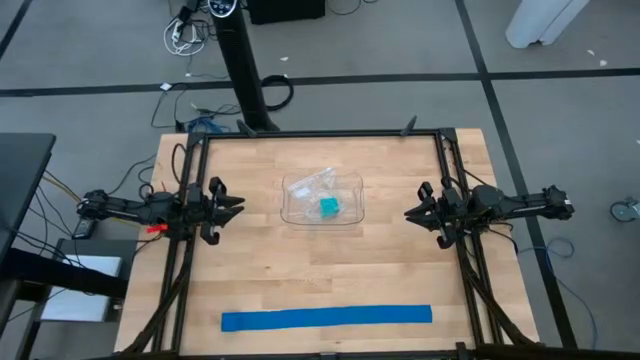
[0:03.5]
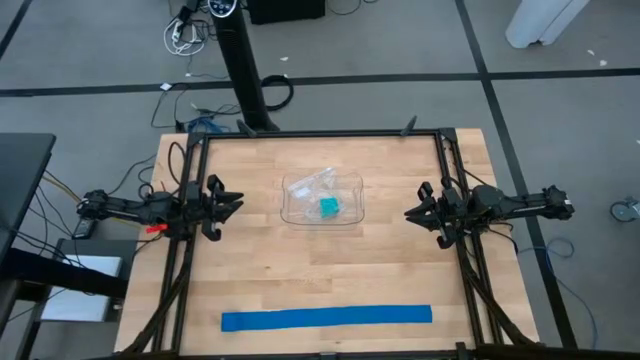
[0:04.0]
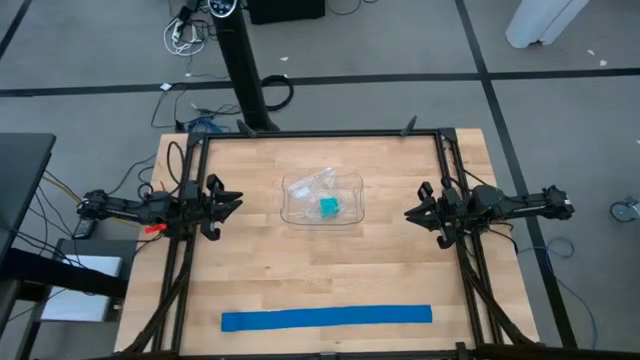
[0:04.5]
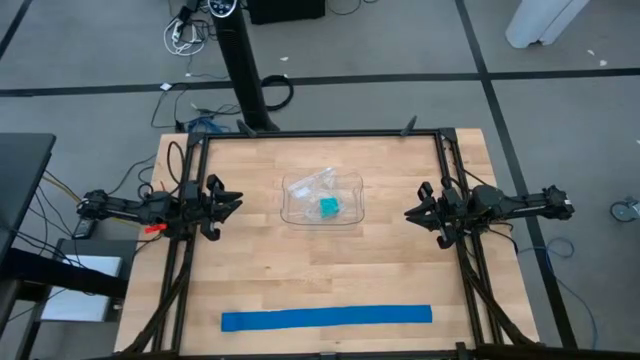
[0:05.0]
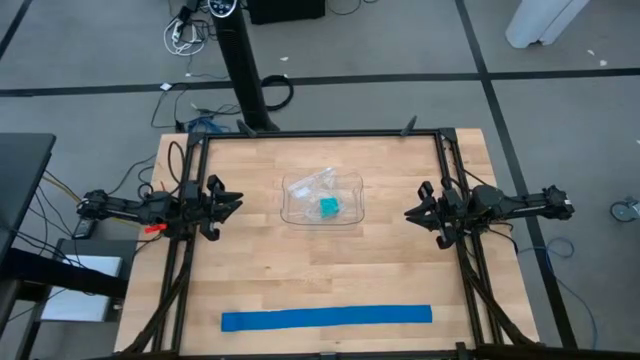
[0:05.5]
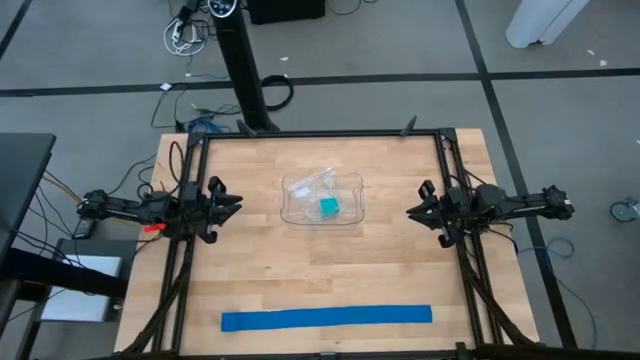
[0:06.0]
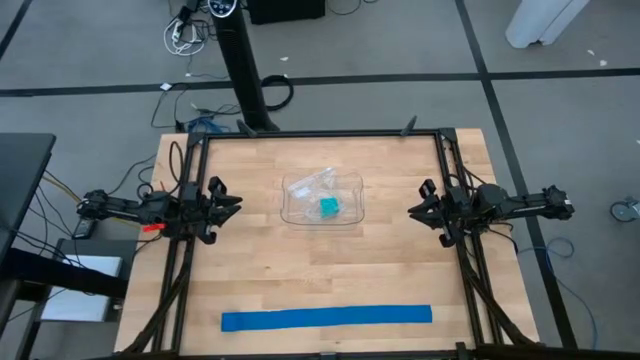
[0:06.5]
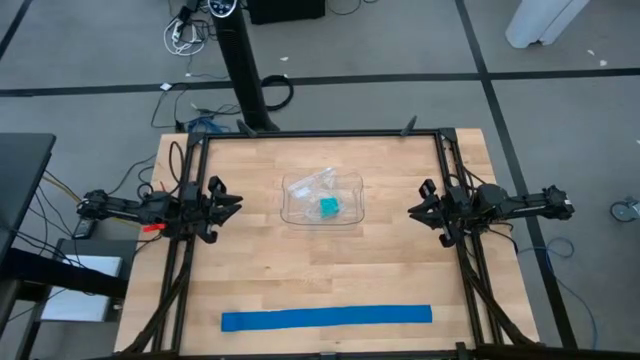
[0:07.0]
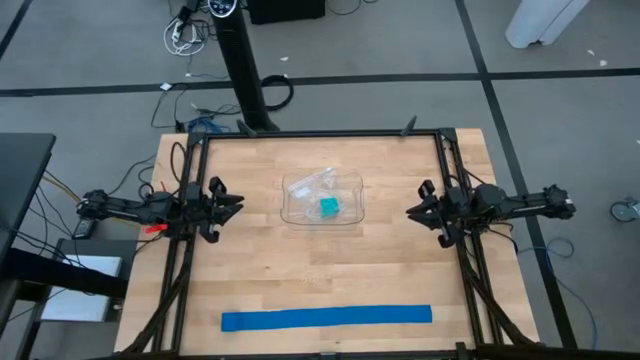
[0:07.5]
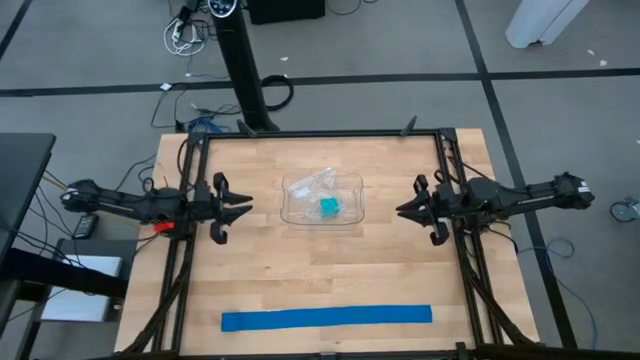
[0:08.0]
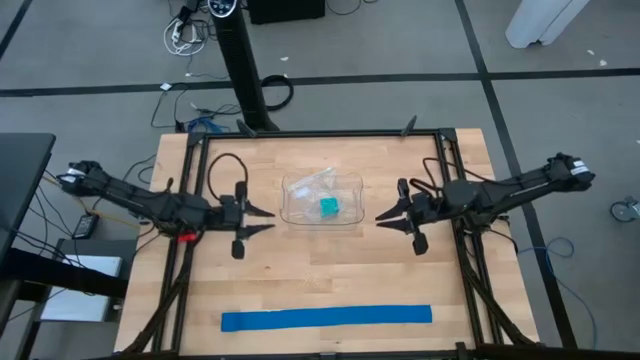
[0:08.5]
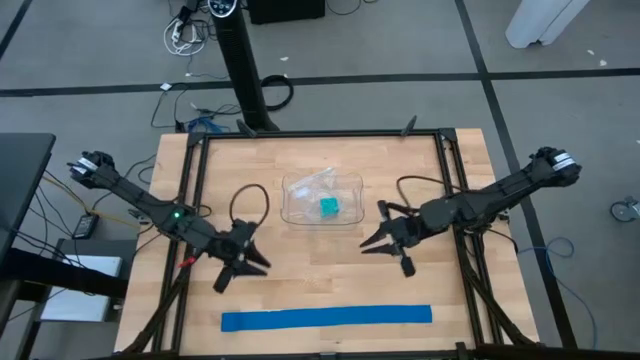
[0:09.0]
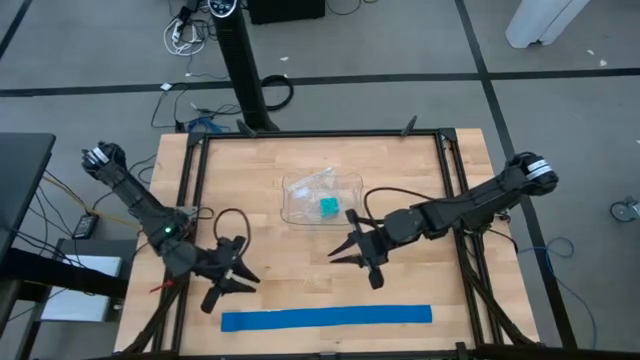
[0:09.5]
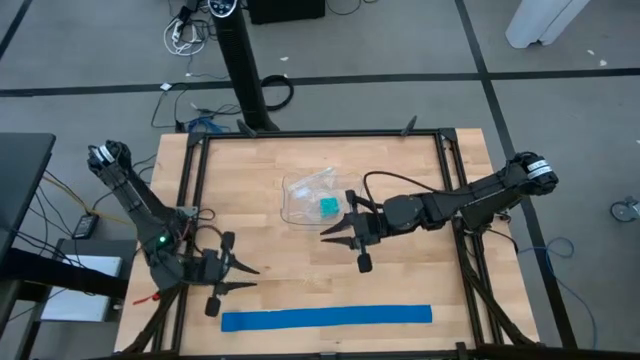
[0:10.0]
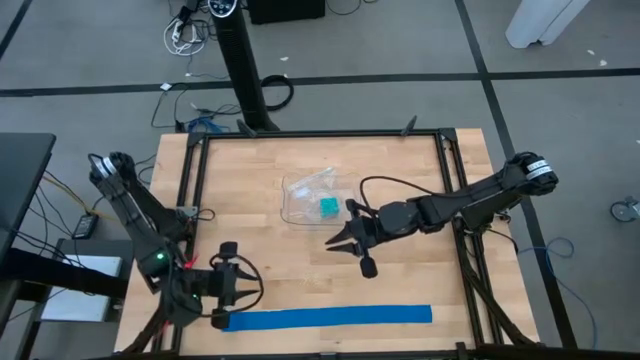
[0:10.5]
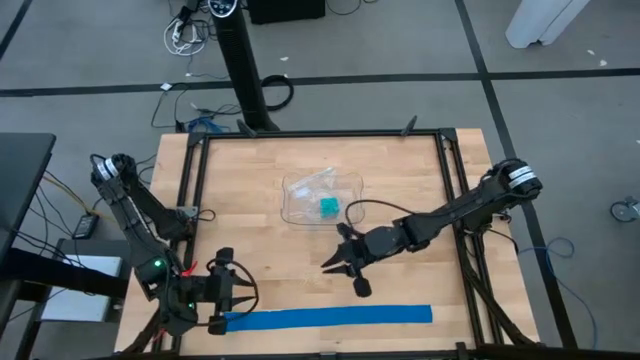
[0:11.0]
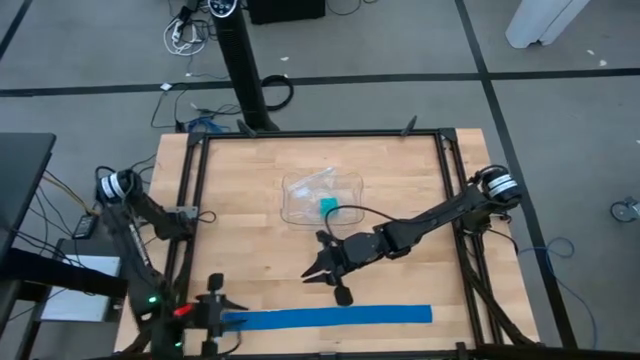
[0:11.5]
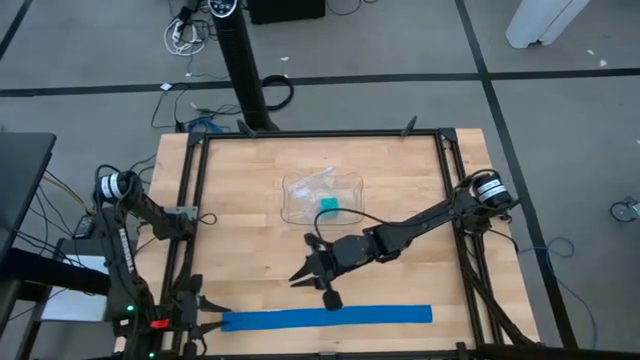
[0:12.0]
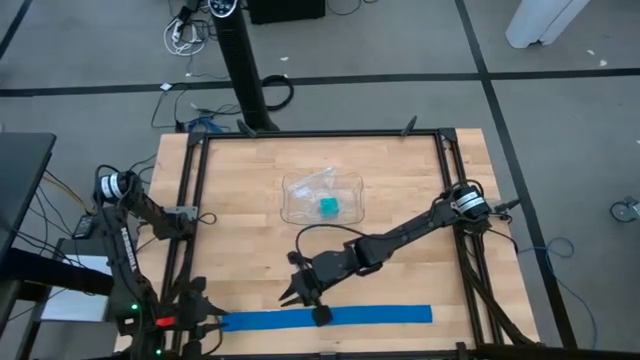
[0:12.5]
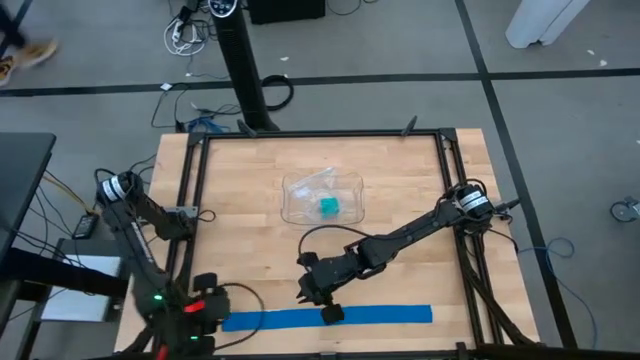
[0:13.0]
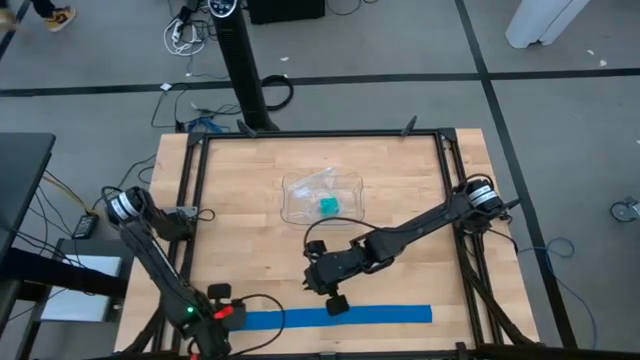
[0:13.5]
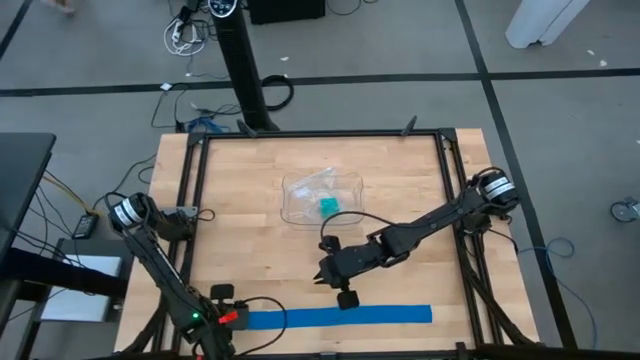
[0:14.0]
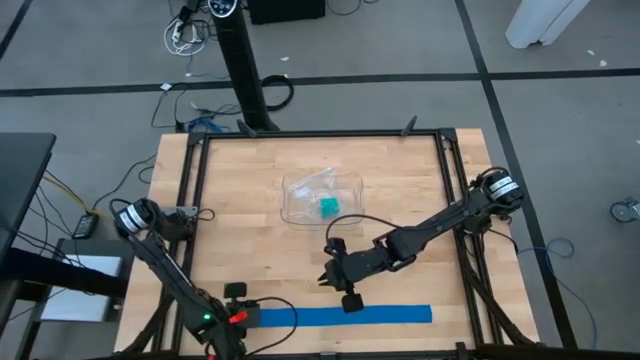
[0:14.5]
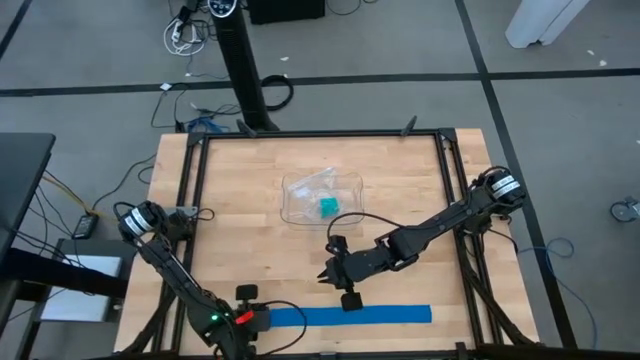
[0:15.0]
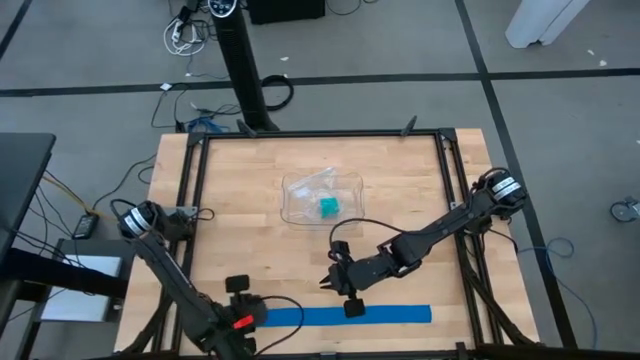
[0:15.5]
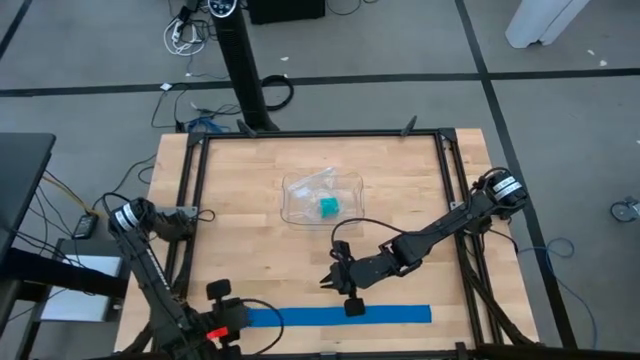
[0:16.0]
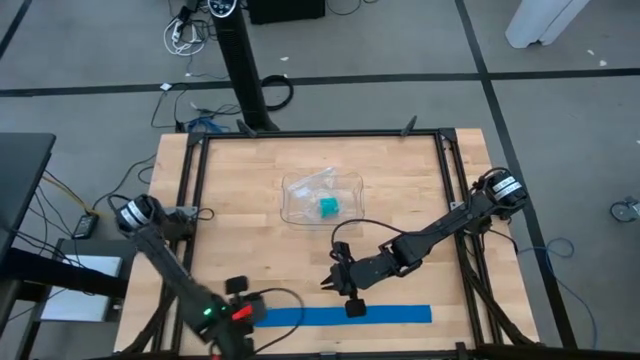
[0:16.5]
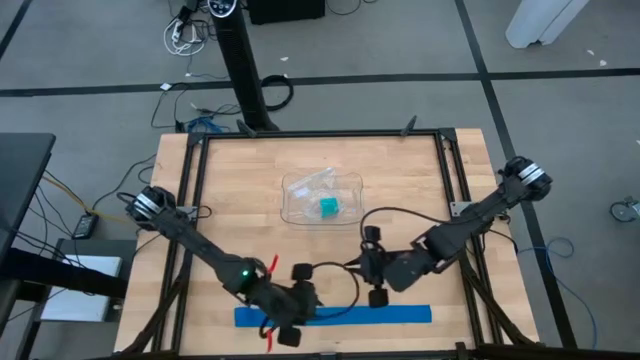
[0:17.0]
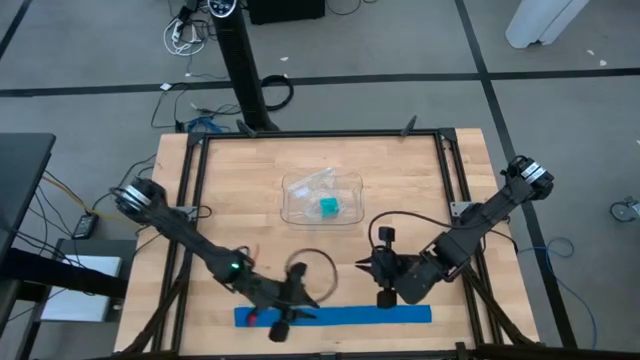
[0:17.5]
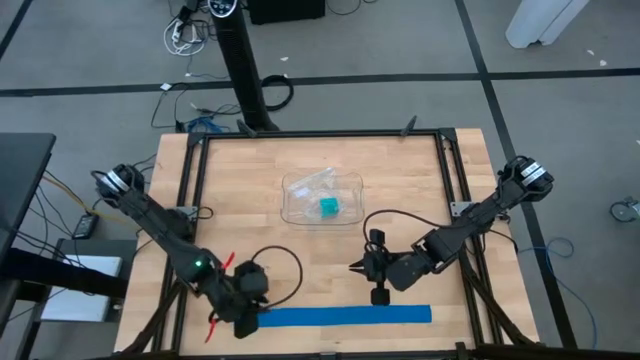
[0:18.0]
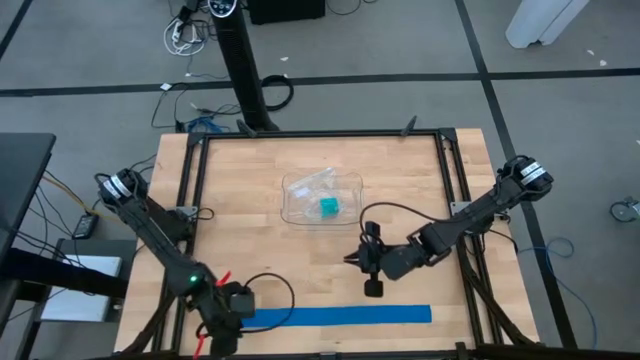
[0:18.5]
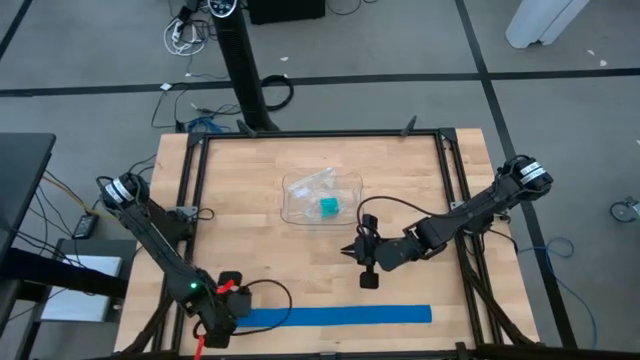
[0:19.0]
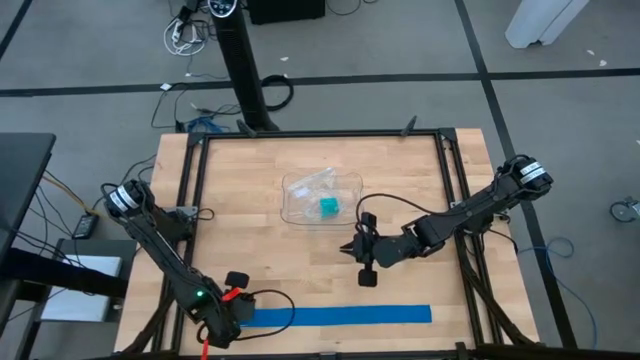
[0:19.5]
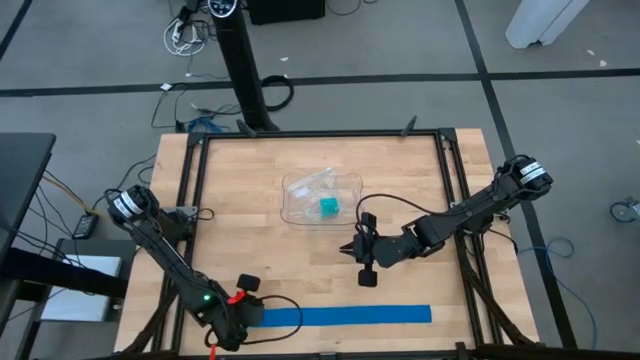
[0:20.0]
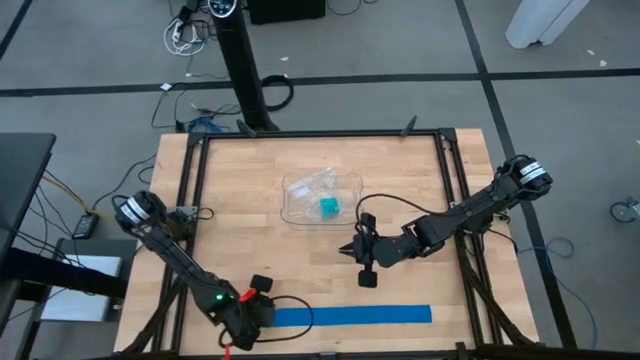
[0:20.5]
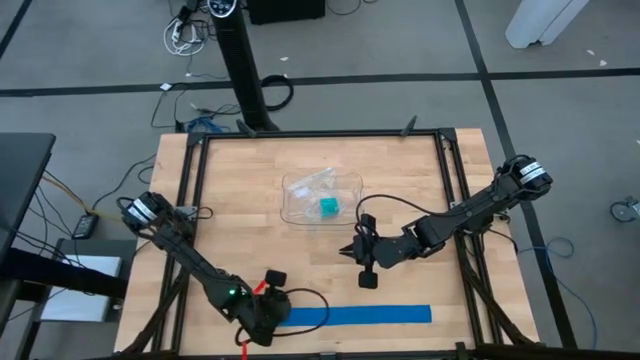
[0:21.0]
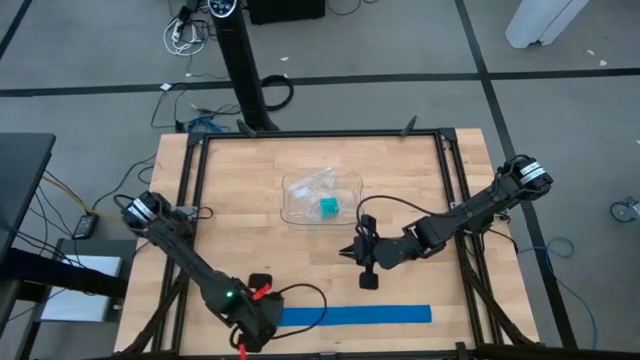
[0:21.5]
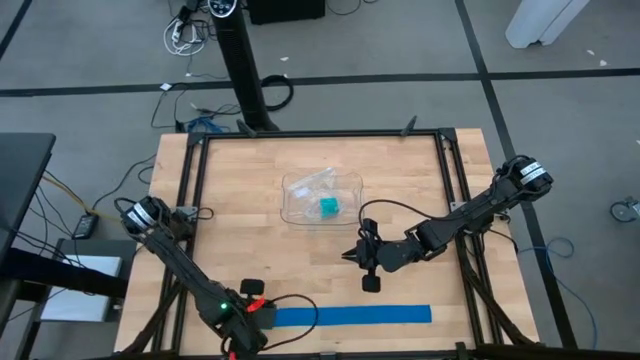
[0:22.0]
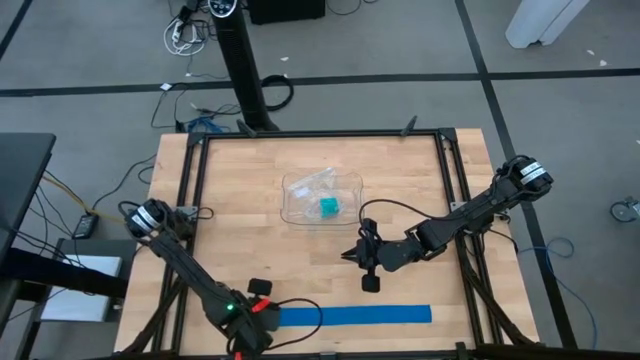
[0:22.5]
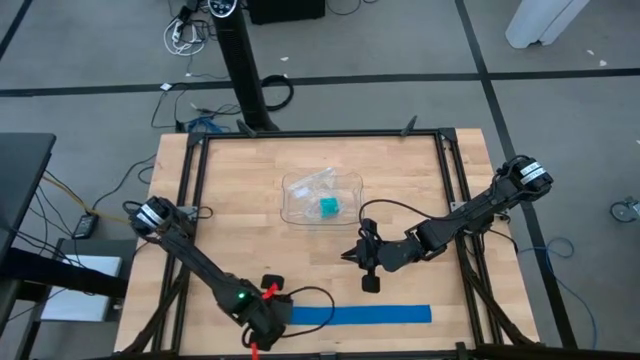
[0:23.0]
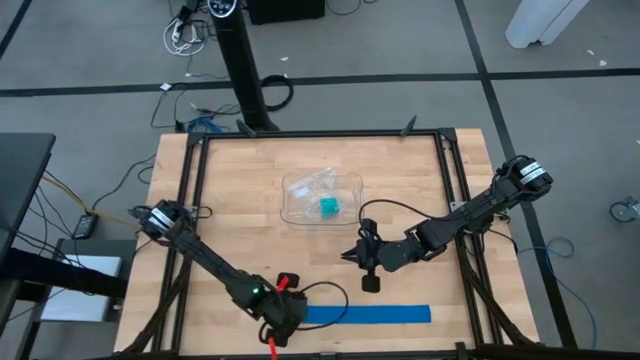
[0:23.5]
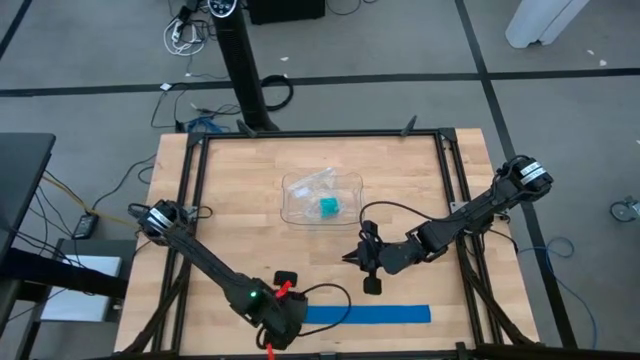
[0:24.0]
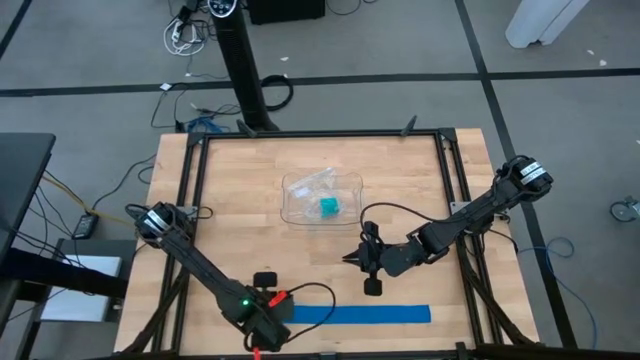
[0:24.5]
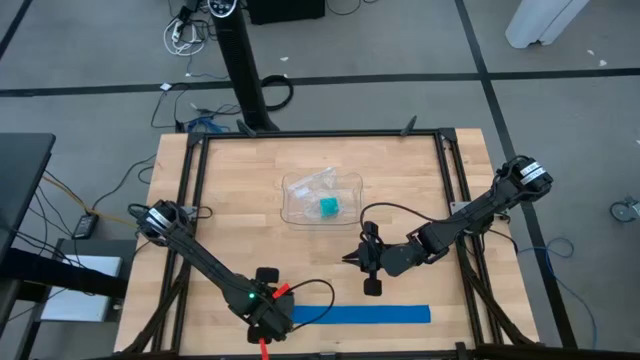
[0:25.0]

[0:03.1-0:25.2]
Task: Roll bandage
Roll the blue bandage
